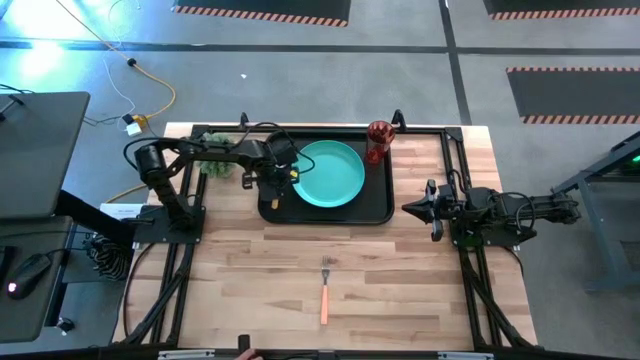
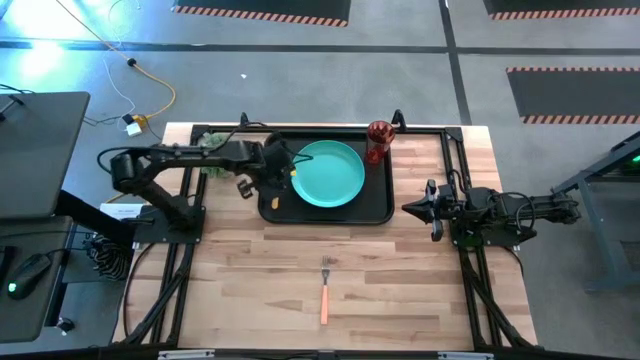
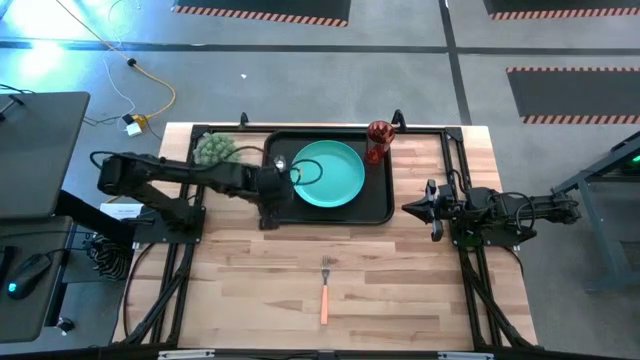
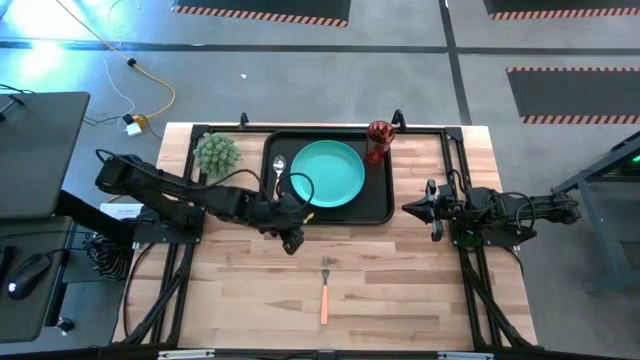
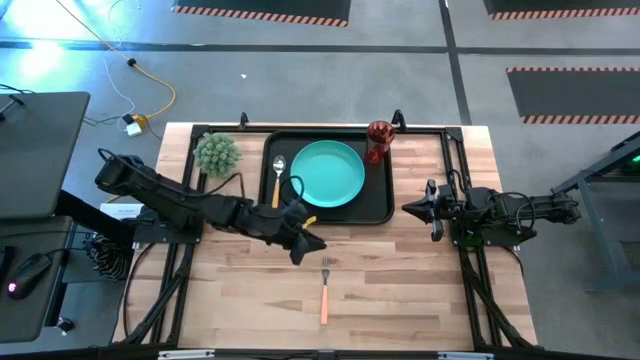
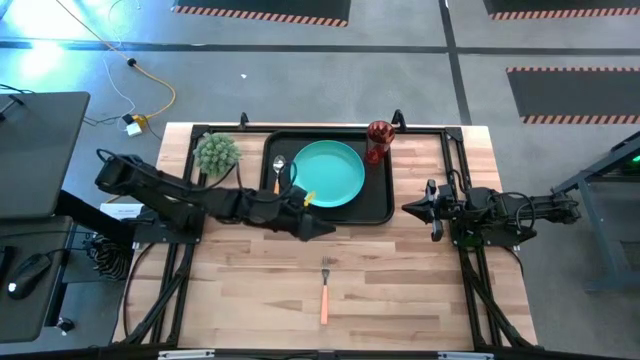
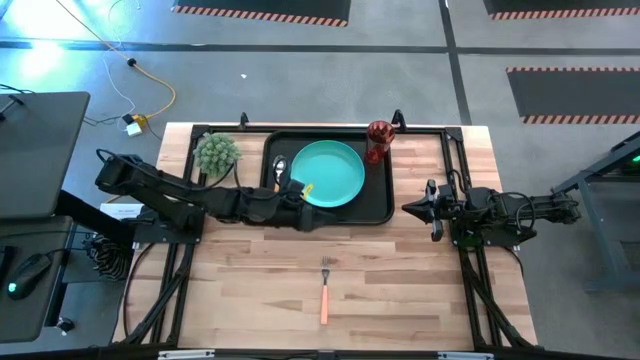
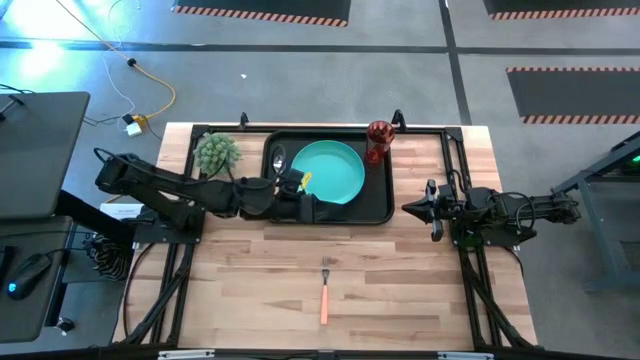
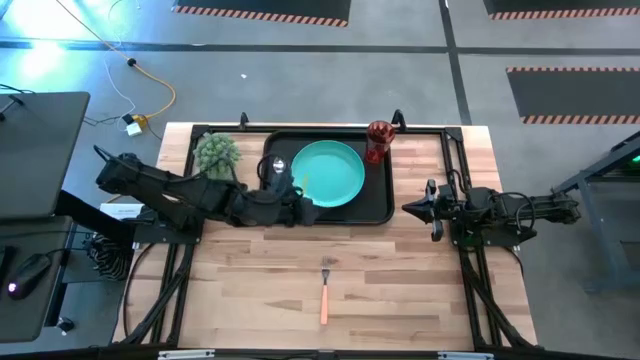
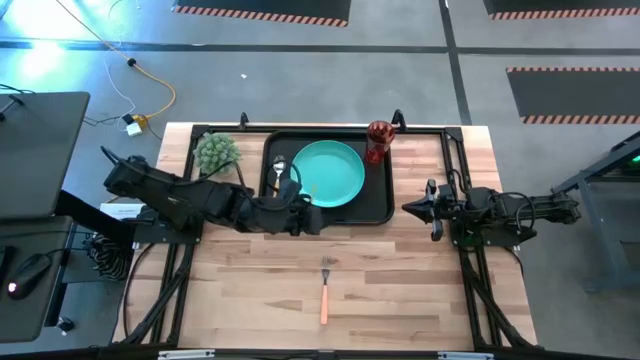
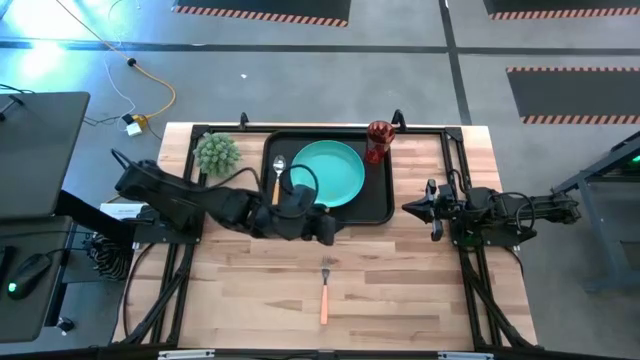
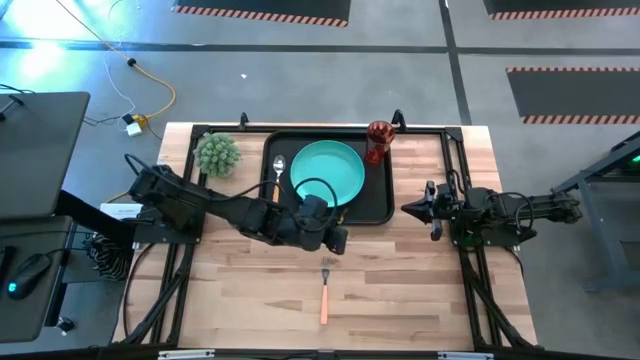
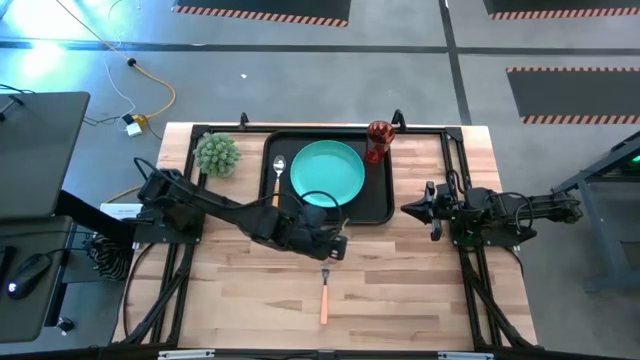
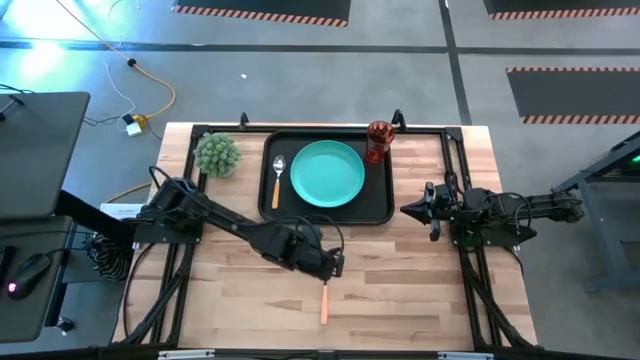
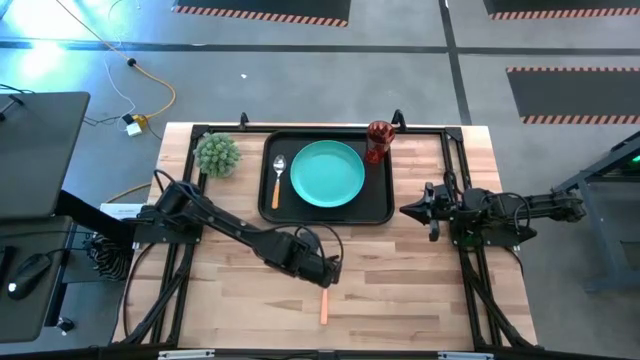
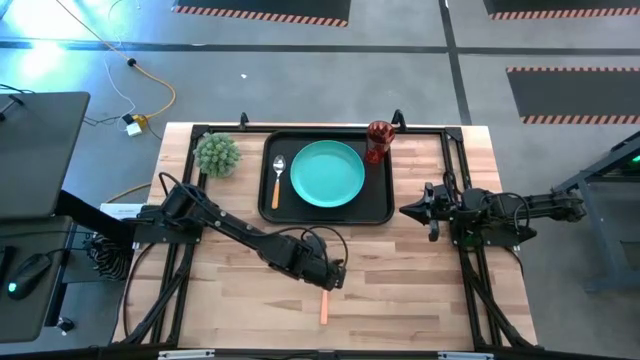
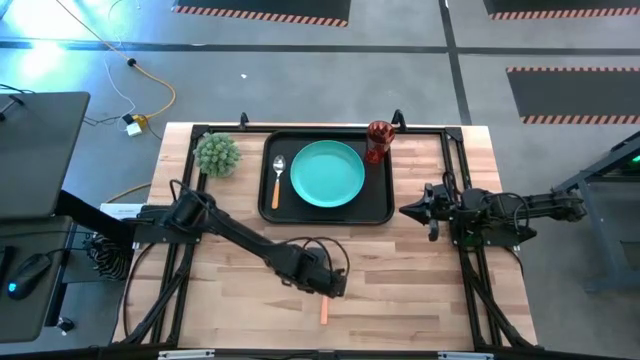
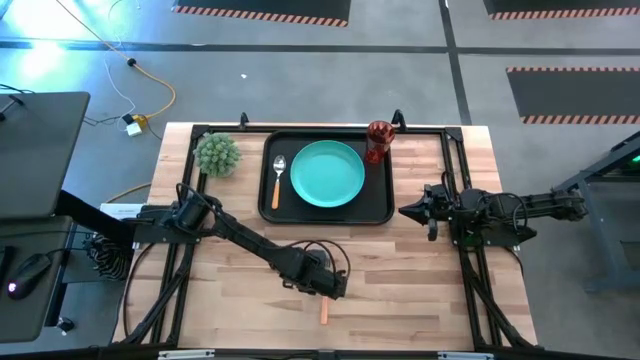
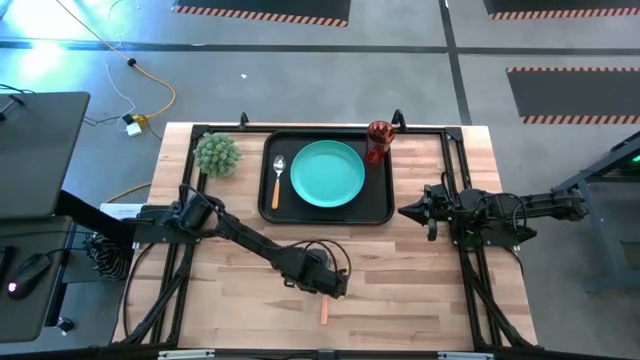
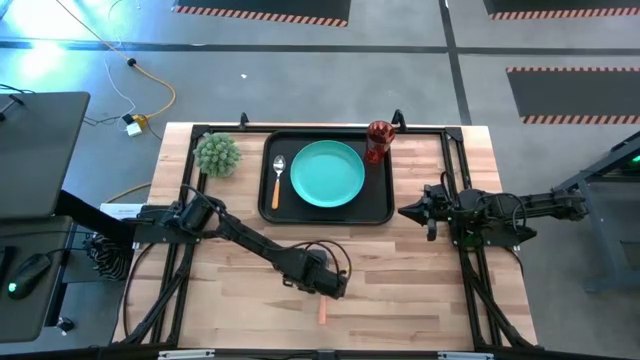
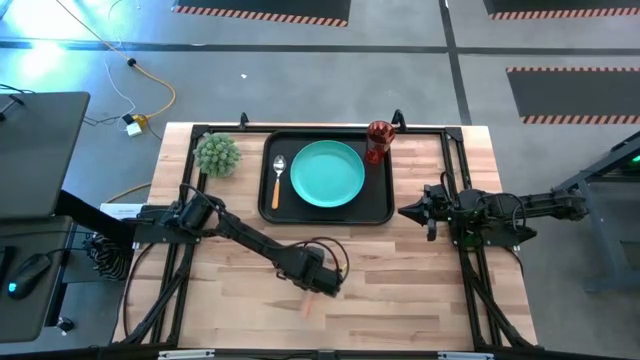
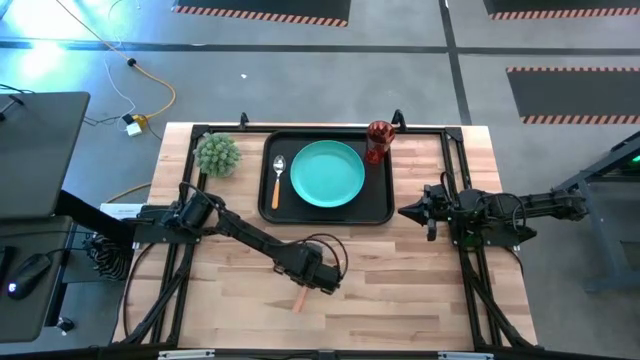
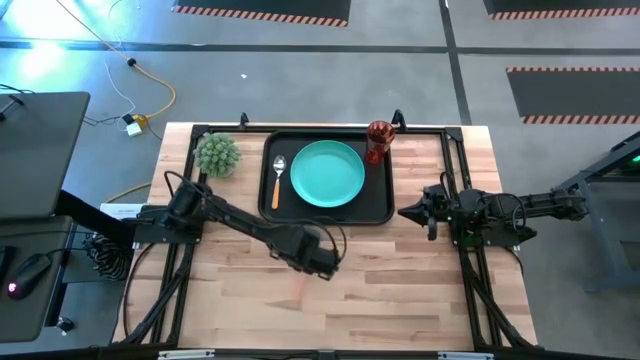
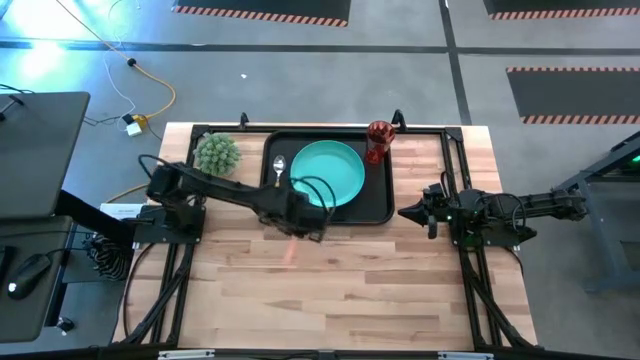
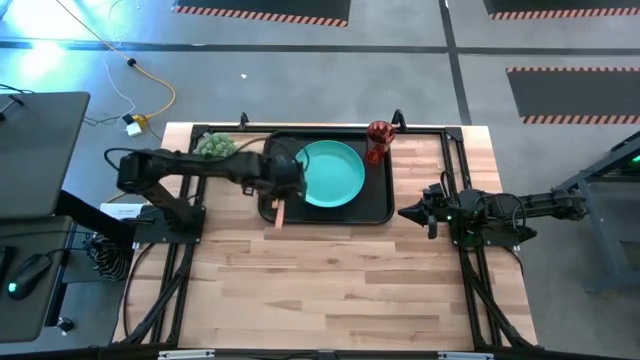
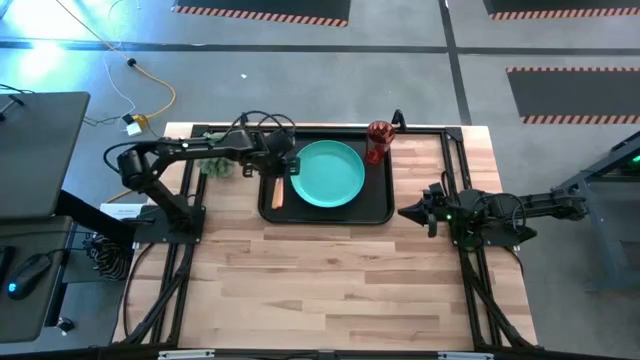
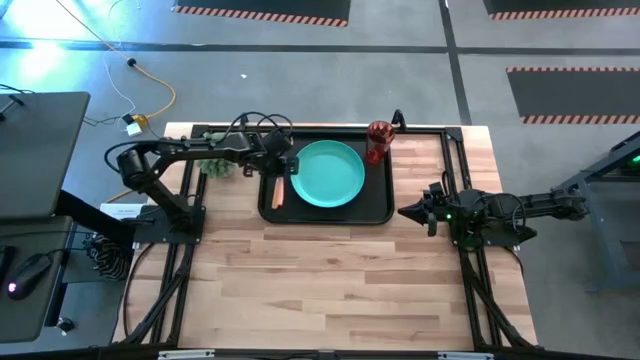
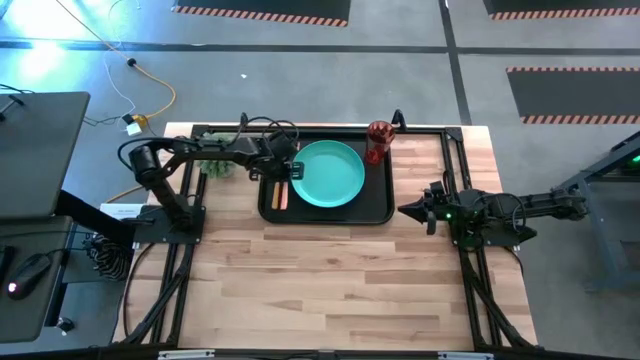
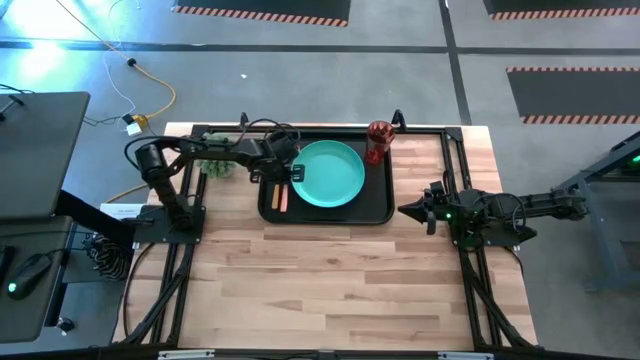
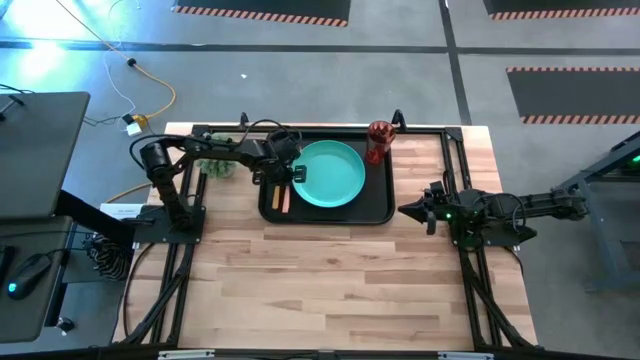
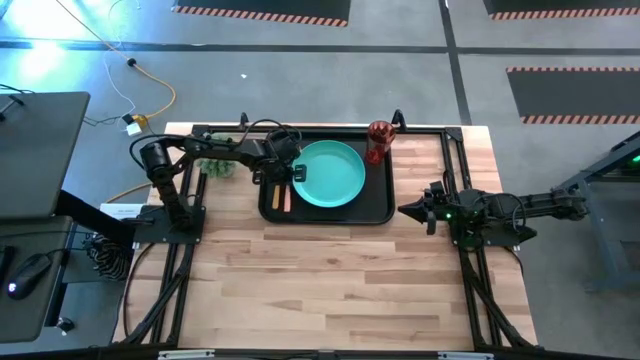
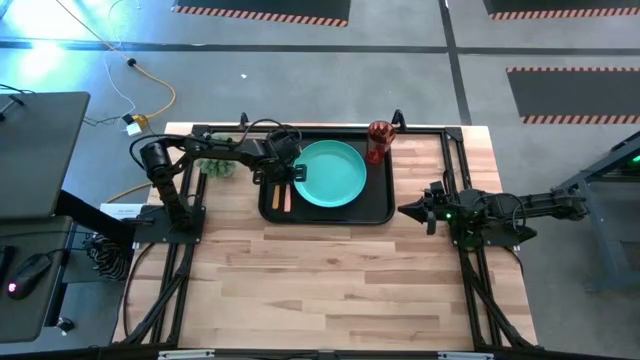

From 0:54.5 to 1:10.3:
Task: Pick and place plate/cup/fork/spoon on tray
Put the pink fork on the black tray to the right of the yellow spoon

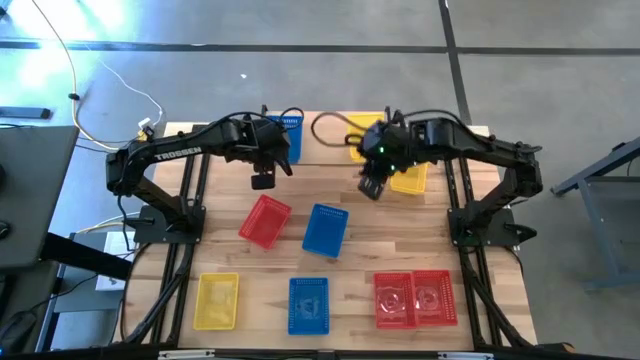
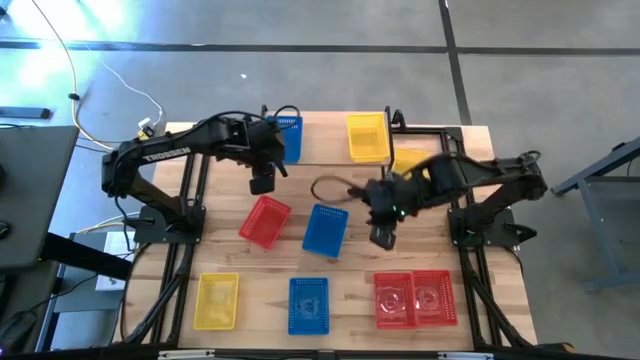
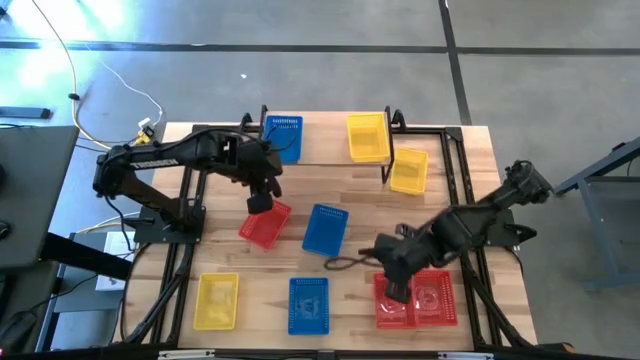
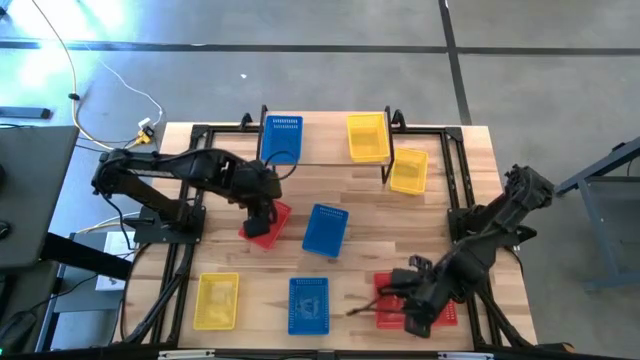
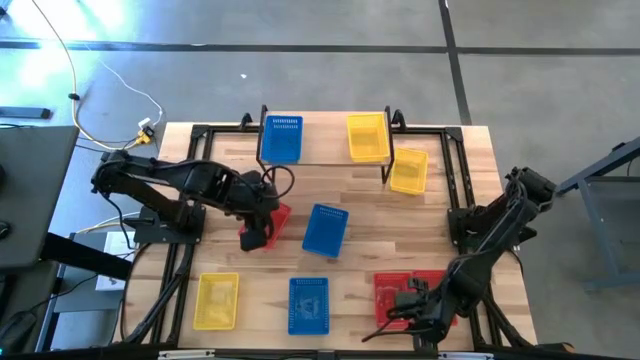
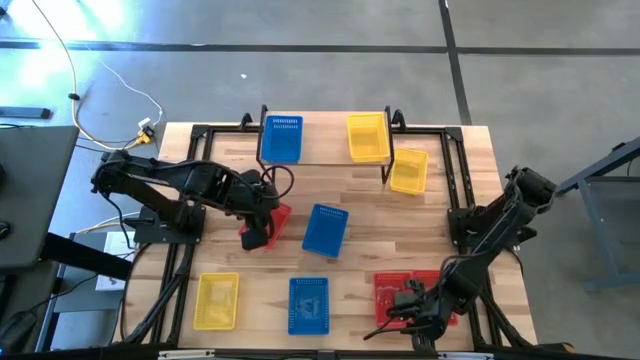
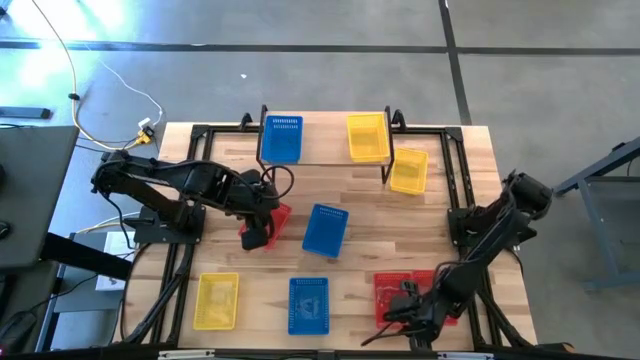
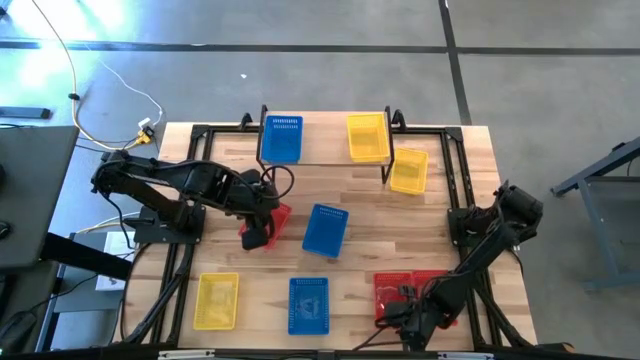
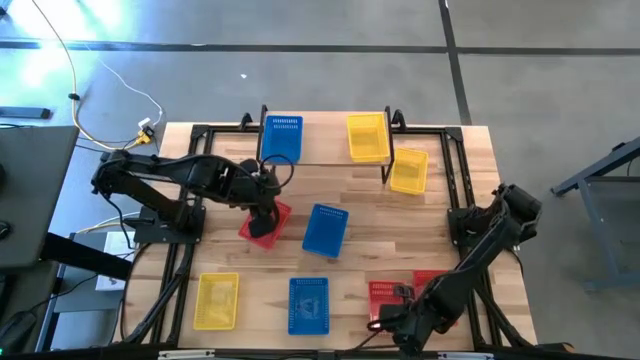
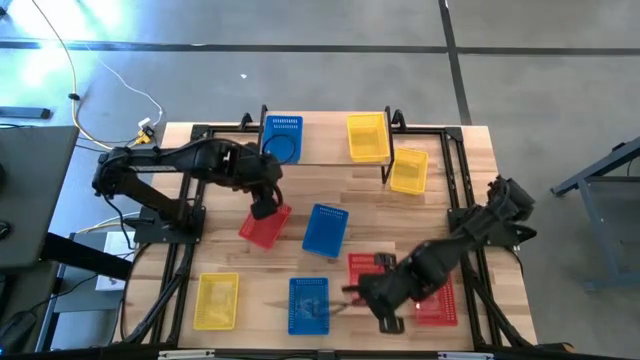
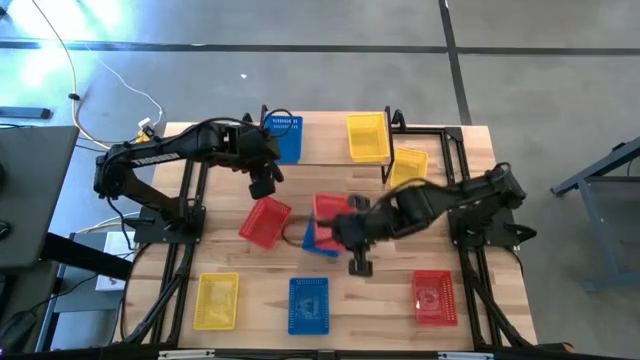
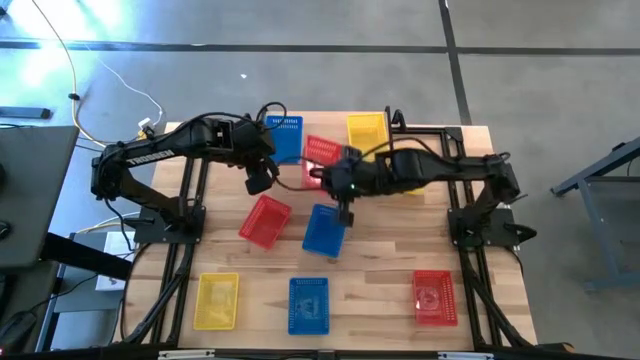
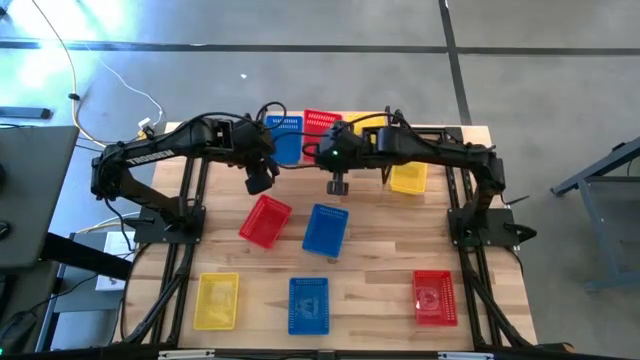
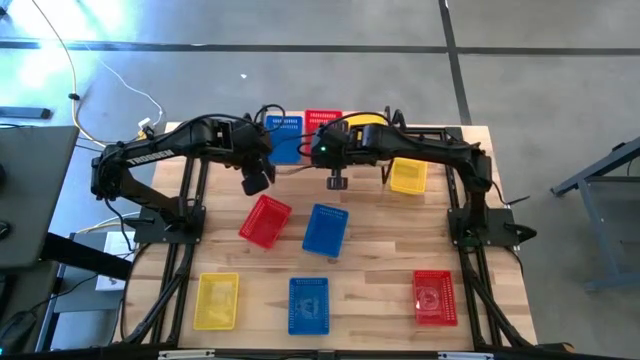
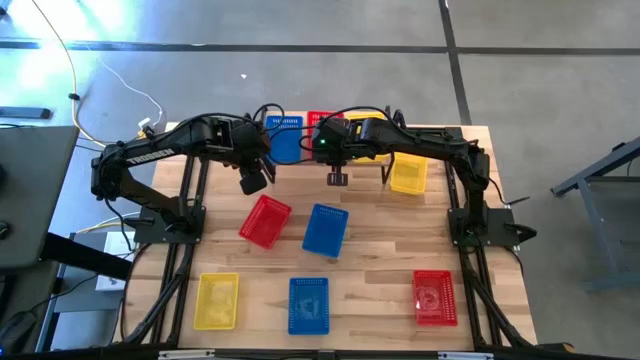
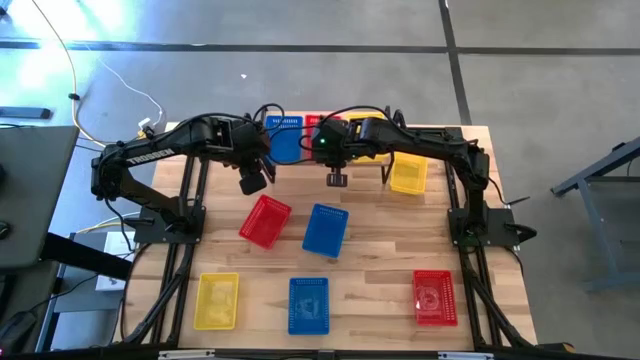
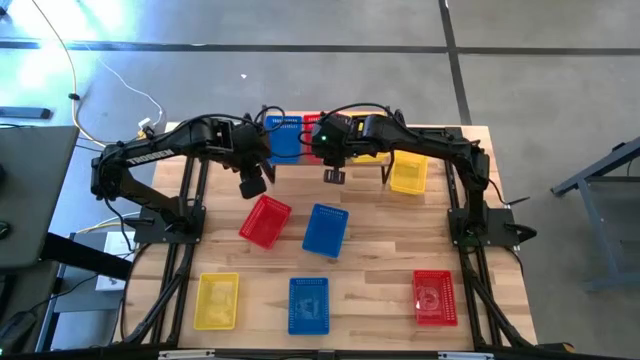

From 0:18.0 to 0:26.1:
Task: Stack baskets on shelf by color
Put the bottom left red basket on the shelf
